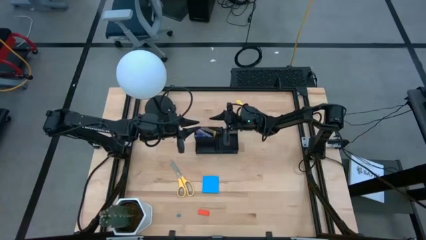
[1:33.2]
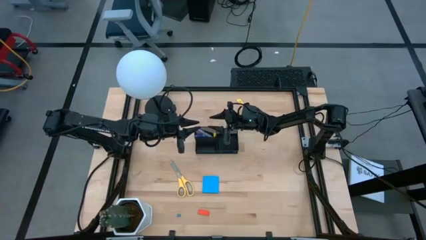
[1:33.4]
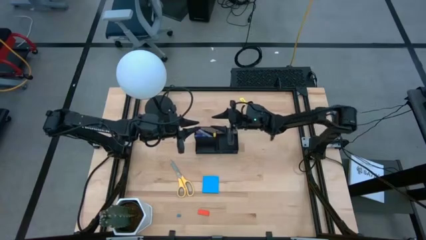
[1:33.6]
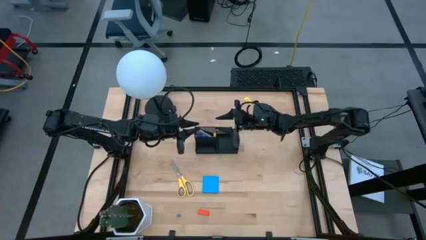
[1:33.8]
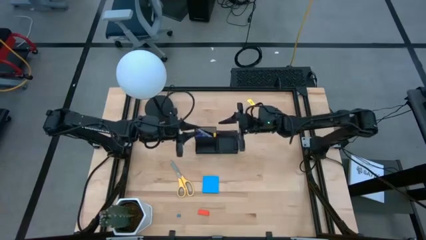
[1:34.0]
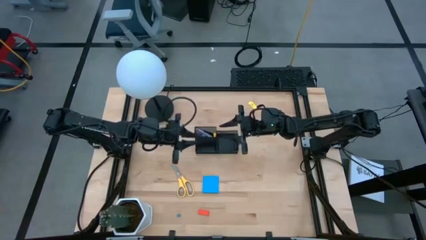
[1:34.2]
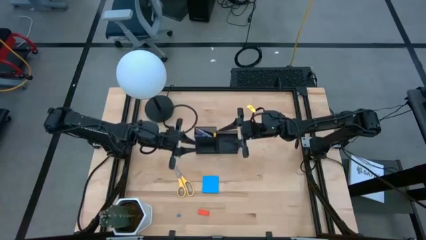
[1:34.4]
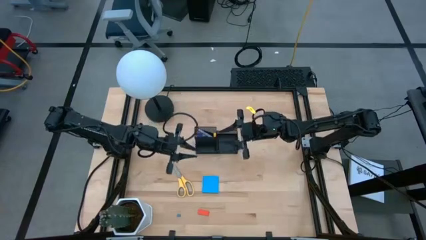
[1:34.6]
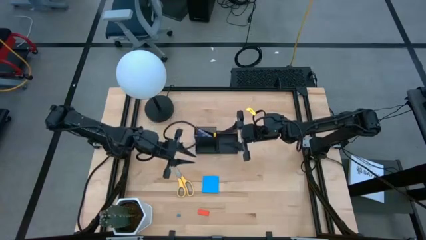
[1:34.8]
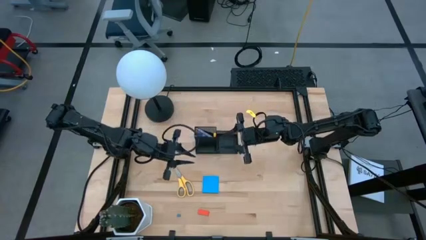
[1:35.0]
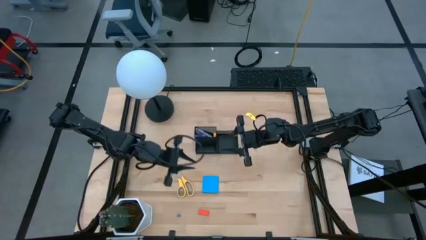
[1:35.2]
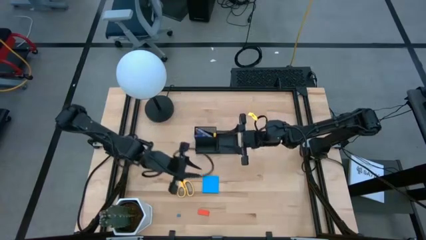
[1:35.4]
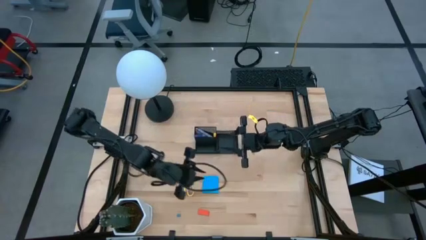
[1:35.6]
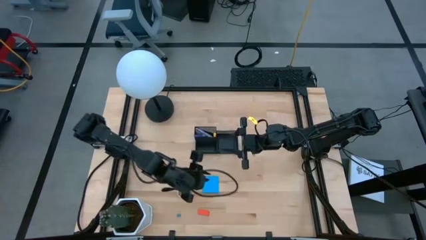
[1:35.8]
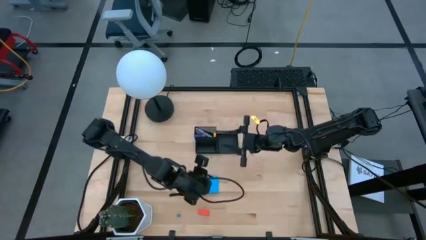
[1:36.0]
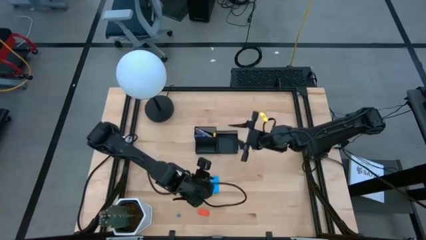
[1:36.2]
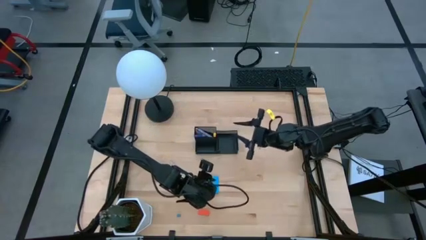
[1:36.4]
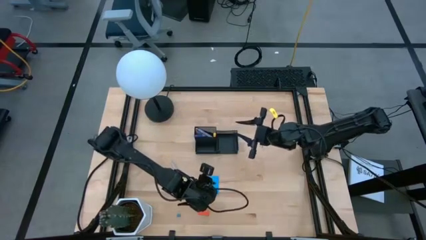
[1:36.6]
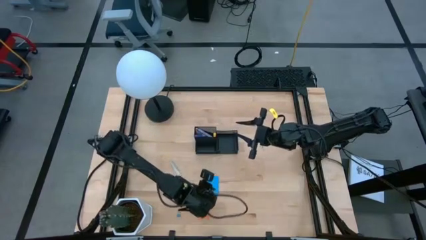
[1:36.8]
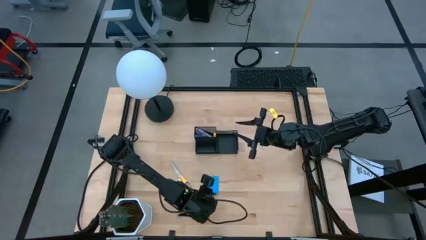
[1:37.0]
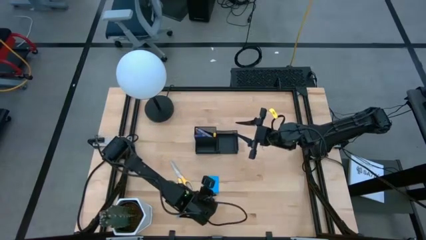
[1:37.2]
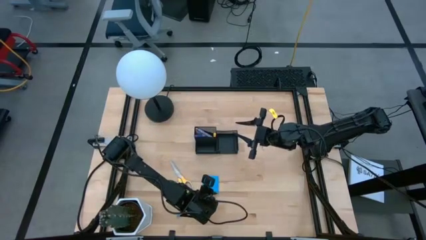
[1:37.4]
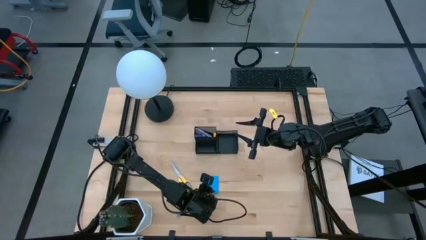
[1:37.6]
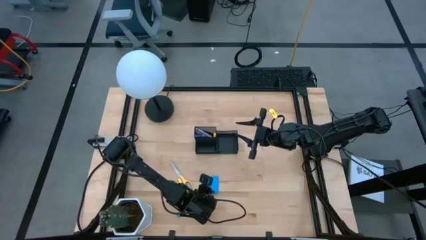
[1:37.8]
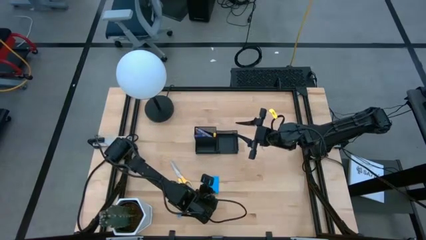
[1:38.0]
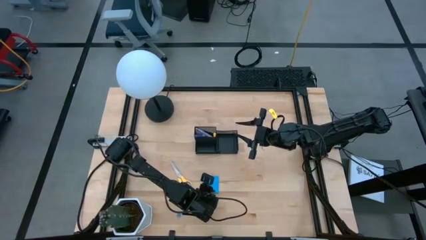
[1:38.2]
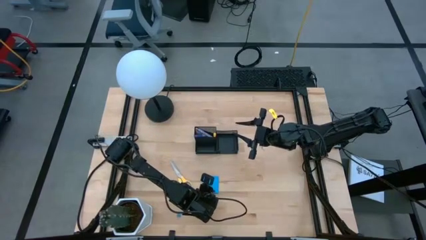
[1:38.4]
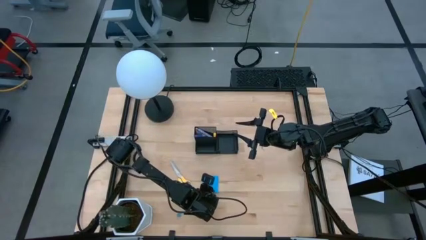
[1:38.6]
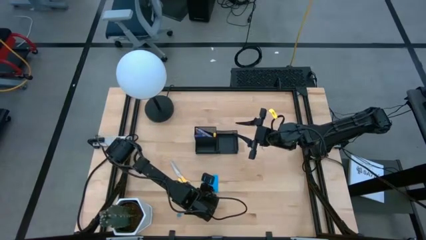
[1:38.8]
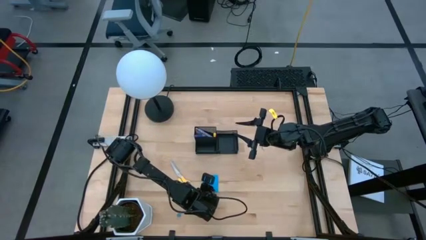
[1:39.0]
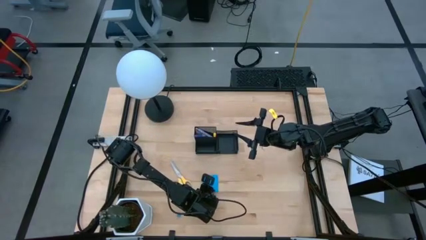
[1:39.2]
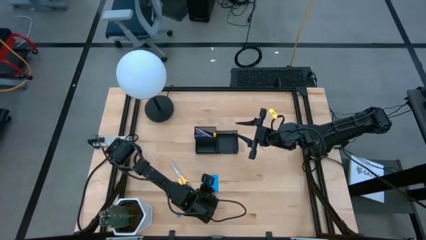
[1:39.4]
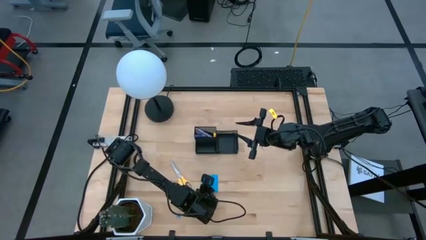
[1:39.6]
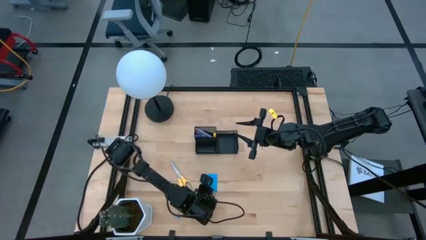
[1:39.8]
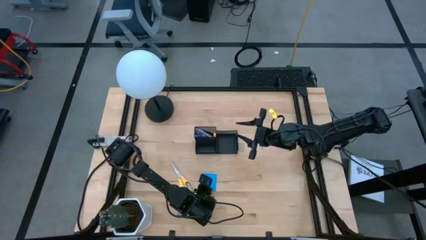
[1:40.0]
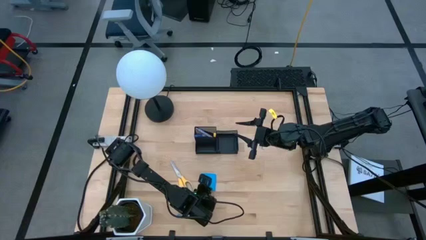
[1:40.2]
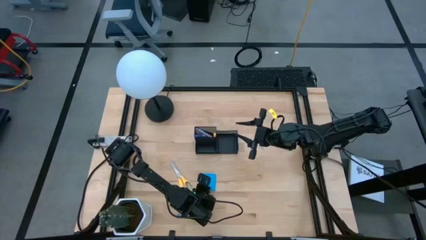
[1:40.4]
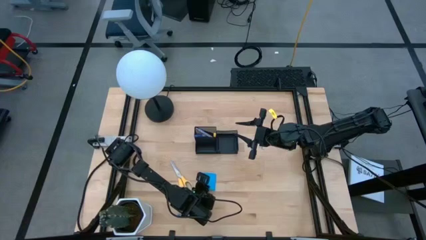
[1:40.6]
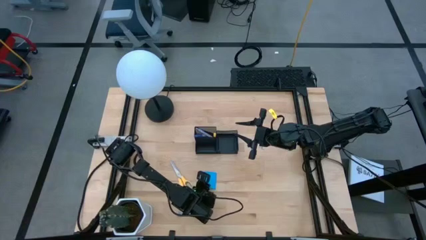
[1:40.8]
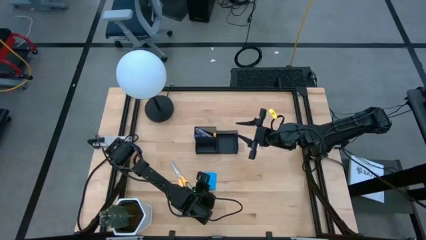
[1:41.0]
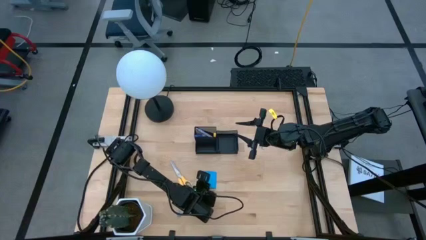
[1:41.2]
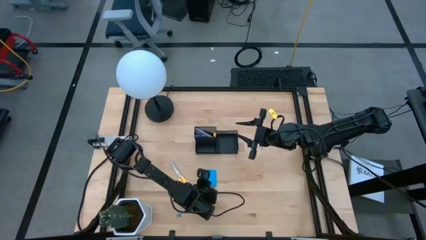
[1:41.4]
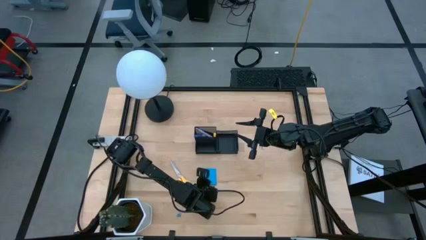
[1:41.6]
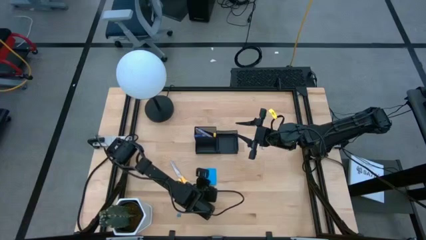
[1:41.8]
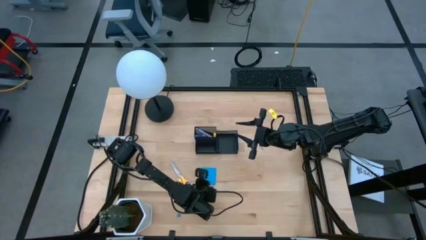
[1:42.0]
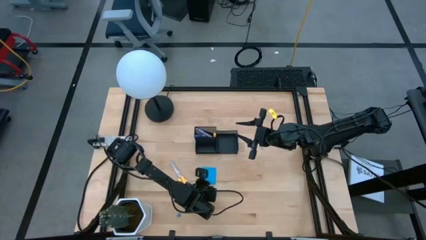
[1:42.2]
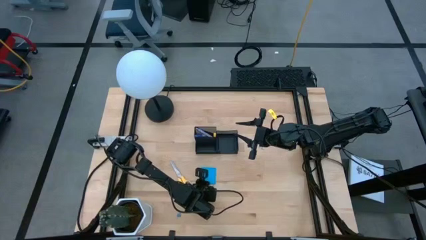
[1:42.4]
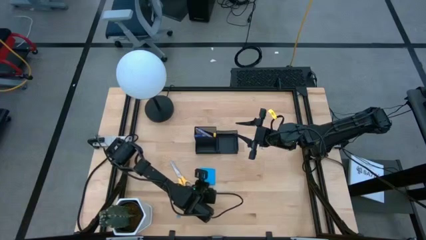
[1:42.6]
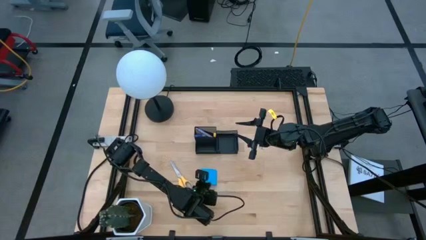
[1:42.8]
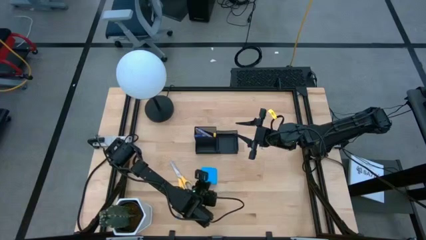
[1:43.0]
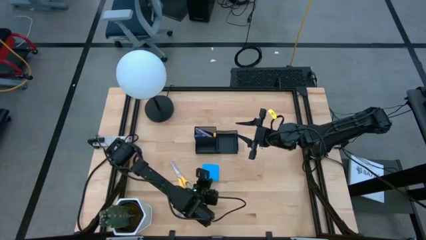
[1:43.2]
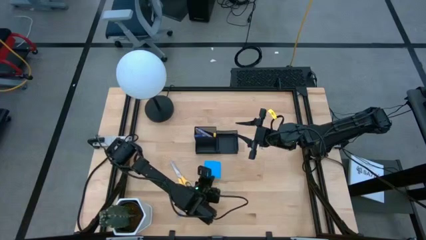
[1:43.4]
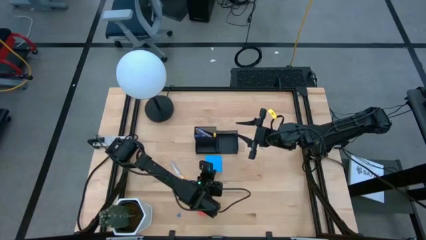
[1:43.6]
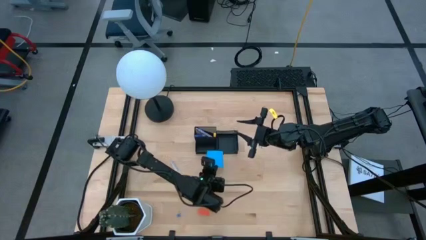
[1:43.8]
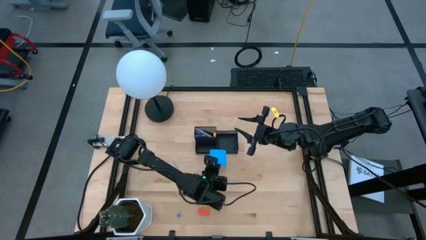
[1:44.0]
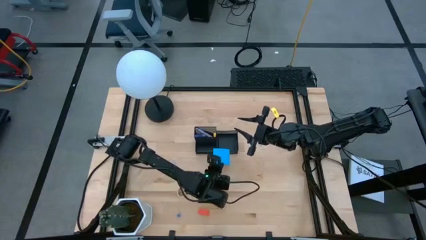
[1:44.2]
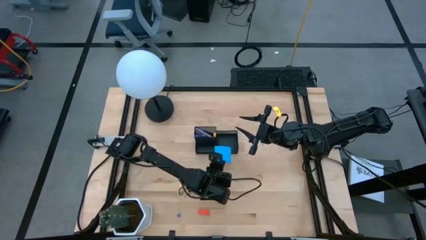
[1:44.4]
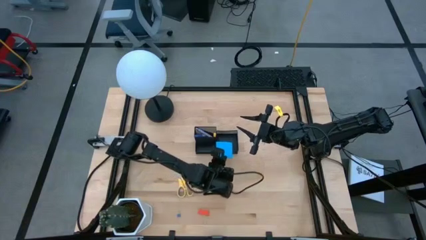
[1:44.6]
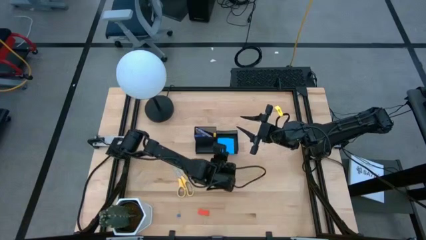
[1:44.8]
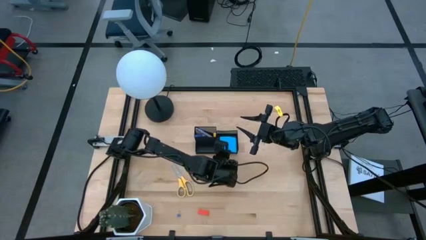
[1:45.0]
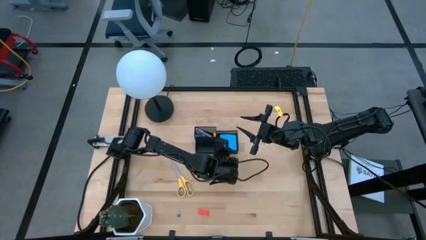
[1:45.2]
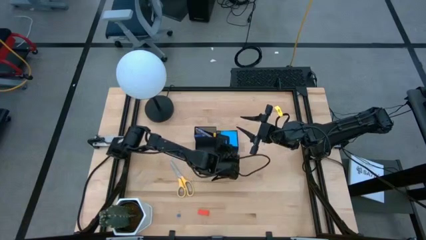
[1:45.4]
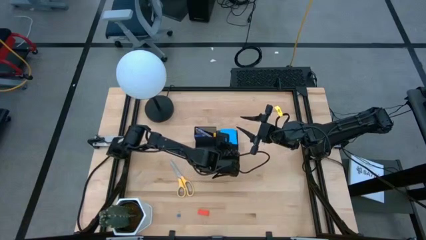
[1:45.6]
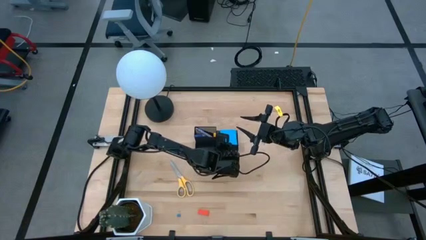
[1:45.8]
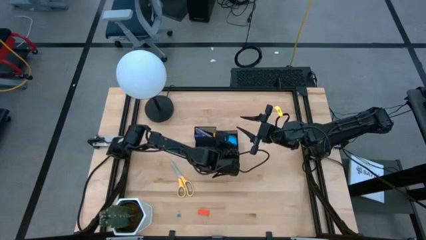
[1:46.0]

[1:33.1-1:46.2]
Task: Pick and place office supplies into organizer
Put the blue sticky note into the desk organizer

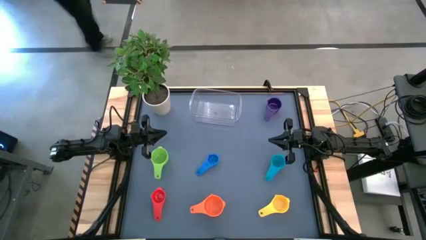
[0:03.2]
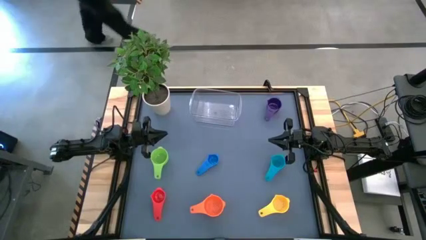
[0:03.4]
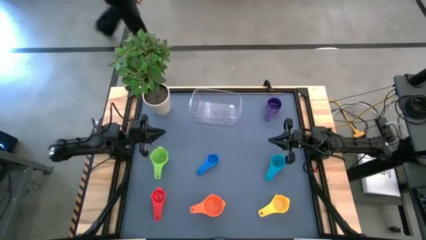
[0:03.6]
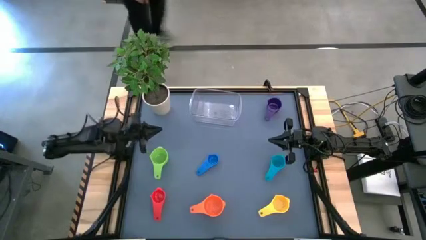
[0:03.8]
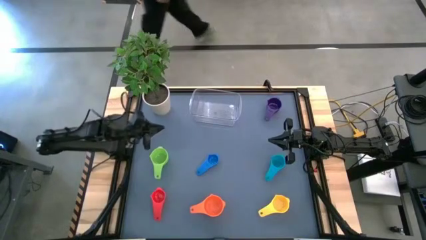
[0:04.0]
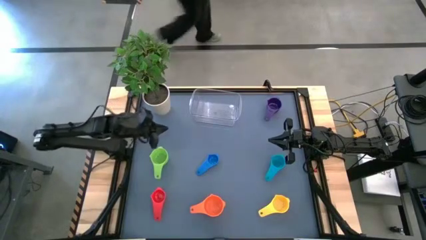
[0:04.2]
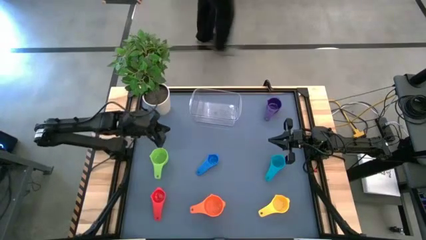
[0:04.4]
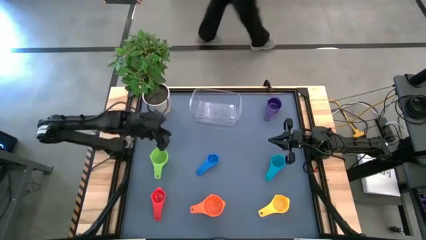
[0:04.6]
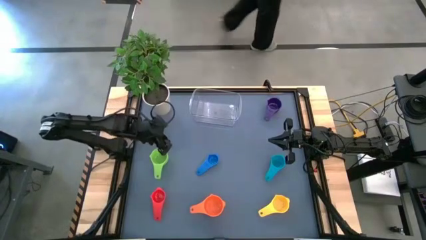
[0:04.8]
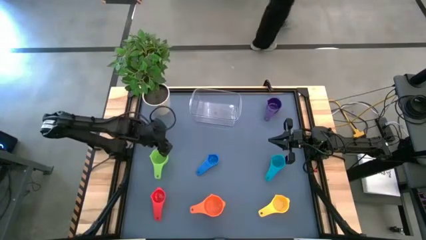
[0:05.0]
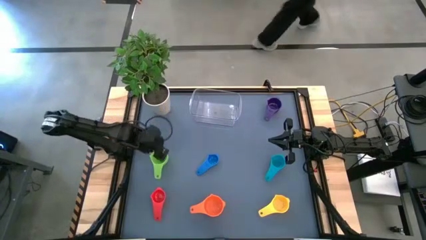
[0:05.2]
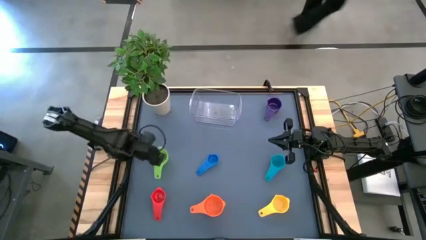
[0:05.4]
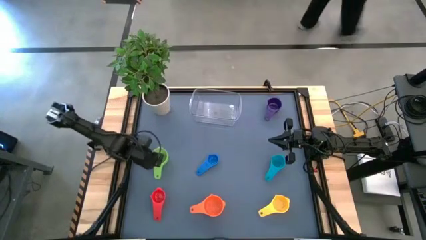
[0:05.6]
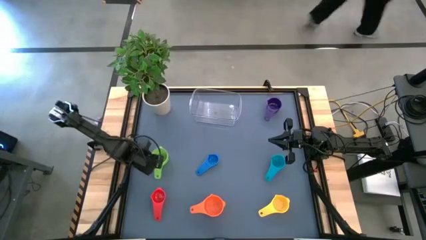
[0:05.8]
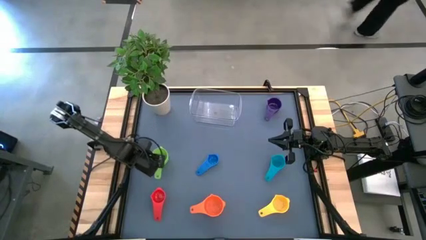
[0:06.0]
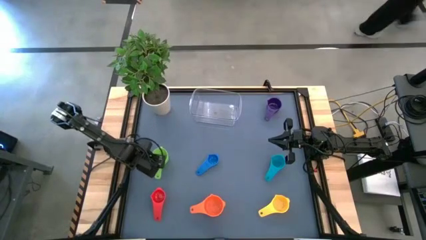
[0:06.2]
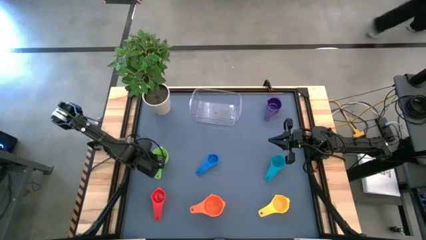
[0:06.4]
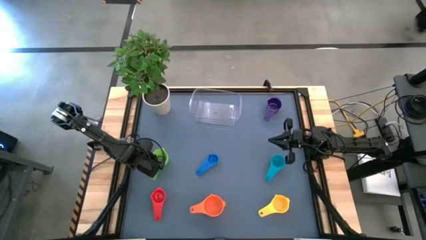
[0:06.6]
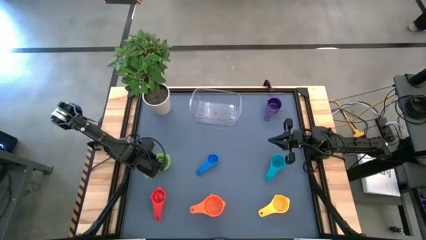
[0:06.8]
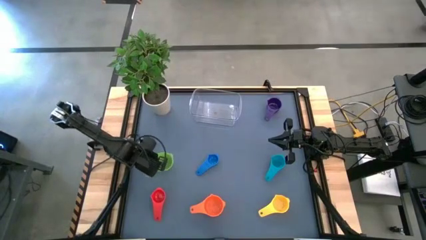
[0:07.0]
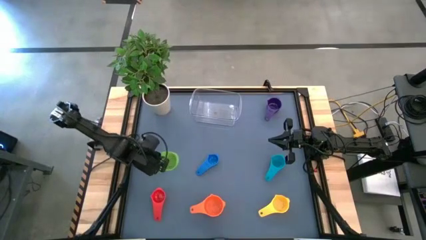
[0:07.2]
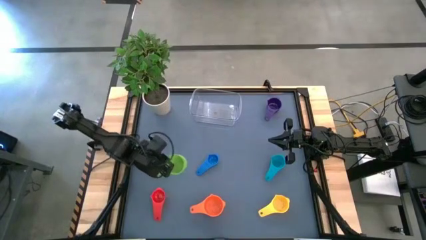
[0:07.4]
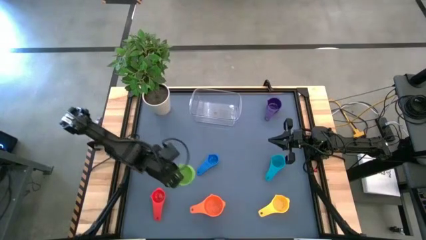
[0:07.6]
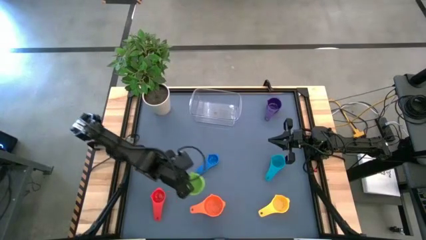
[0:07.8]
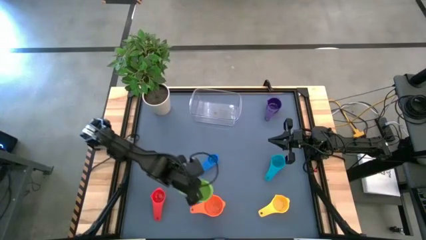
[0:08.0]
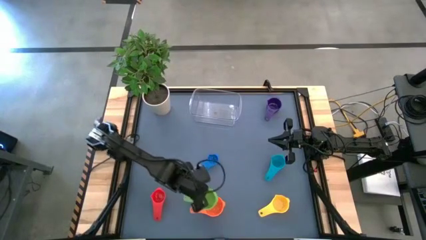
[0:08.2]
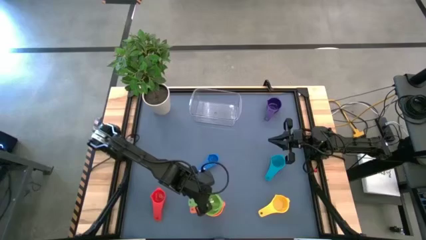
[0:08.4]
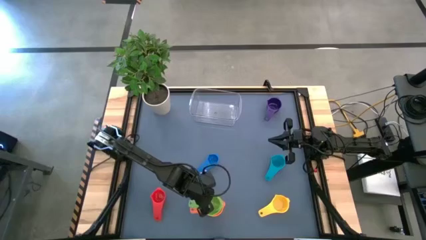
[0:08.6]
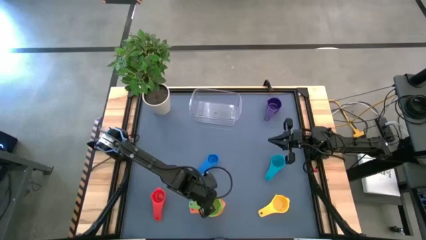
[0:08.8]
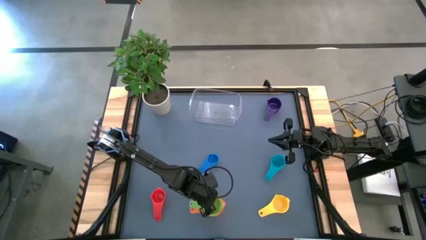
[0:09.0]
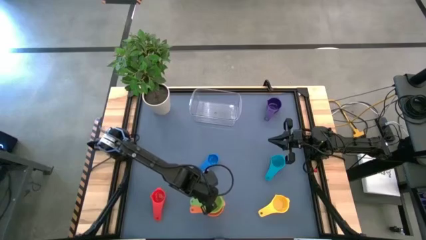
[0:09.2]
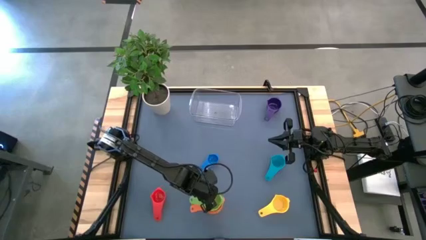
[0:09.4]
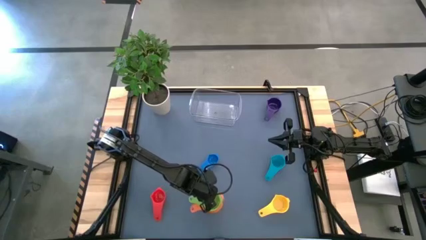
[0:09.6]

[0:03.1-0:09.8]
Task: Nest measuring cups in basket
Stack the green measuring cup on top of the orange measuring cup
